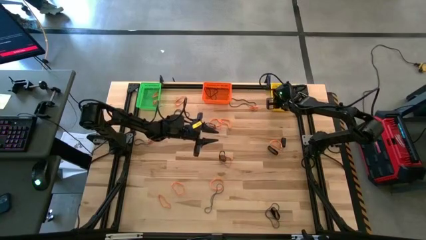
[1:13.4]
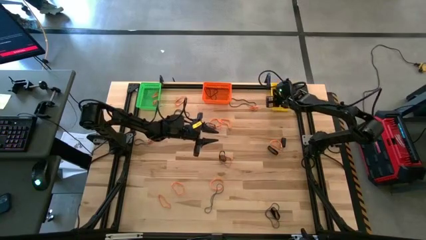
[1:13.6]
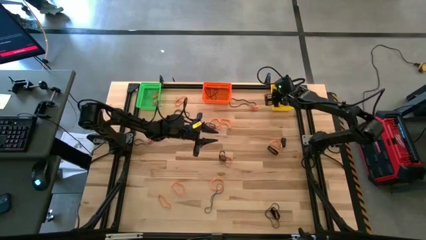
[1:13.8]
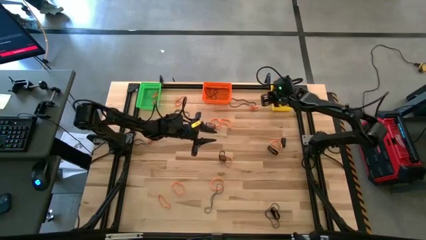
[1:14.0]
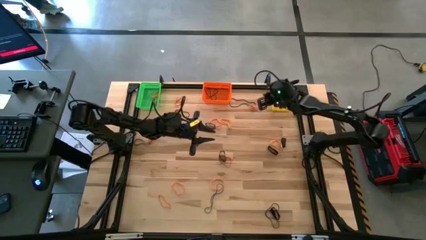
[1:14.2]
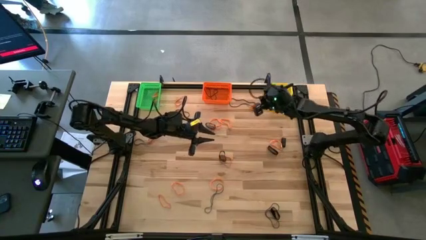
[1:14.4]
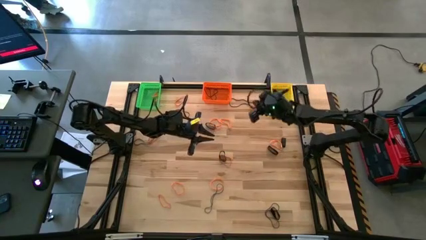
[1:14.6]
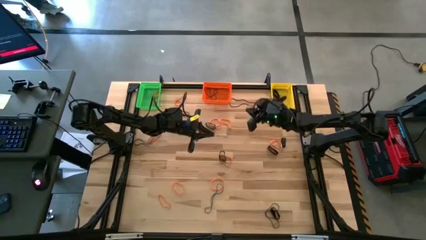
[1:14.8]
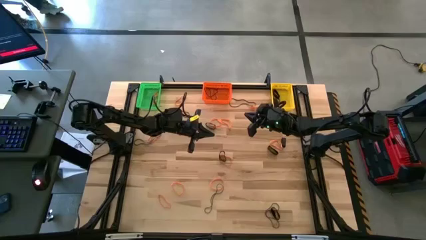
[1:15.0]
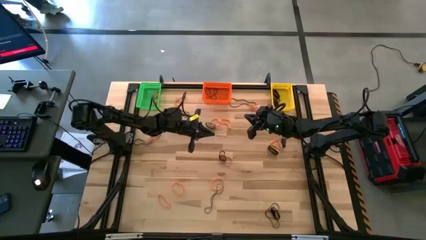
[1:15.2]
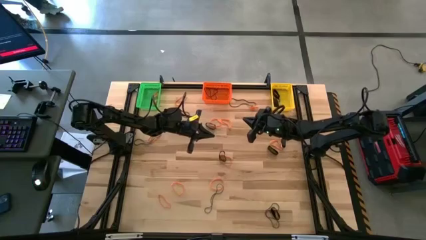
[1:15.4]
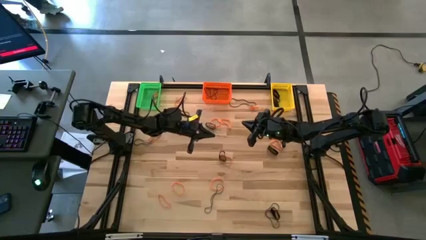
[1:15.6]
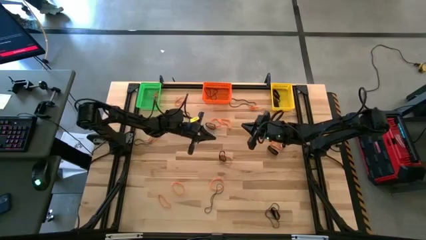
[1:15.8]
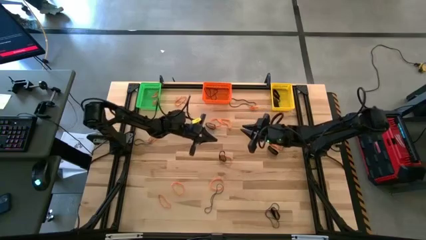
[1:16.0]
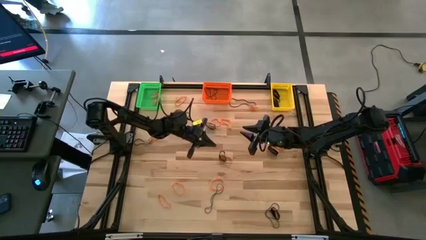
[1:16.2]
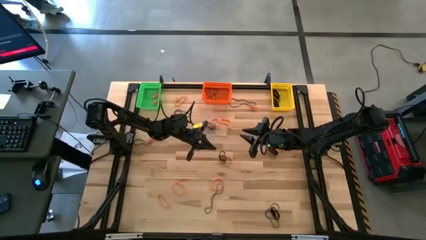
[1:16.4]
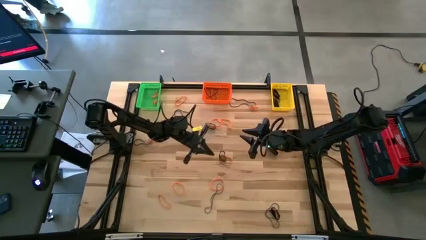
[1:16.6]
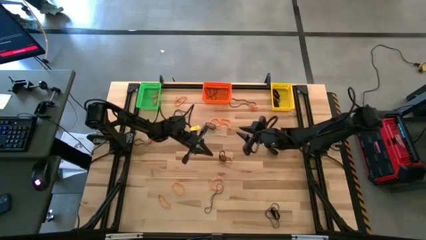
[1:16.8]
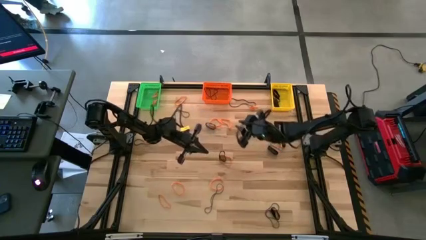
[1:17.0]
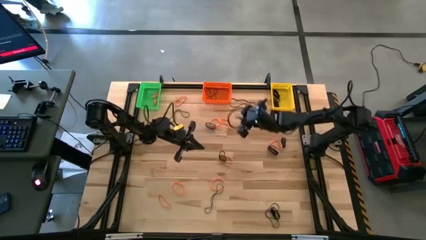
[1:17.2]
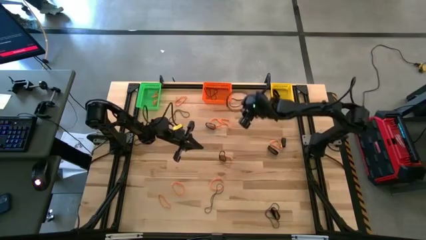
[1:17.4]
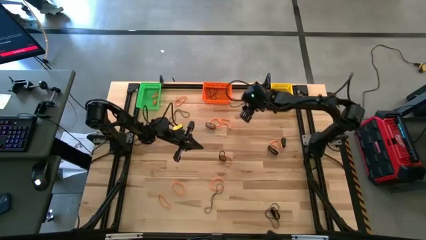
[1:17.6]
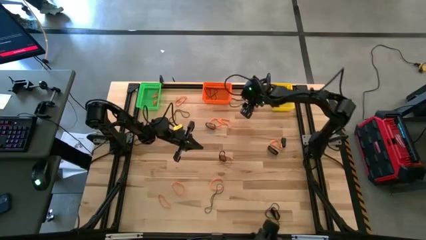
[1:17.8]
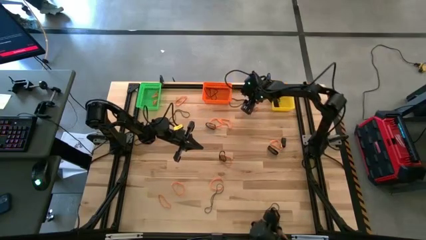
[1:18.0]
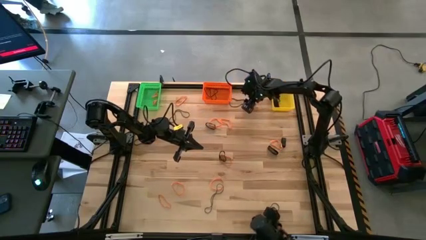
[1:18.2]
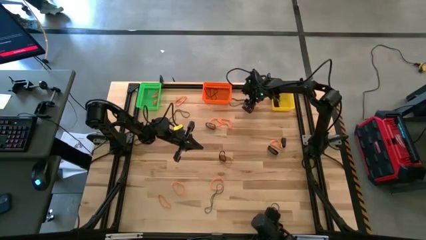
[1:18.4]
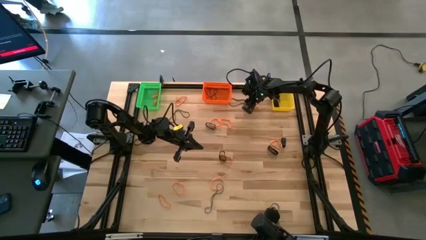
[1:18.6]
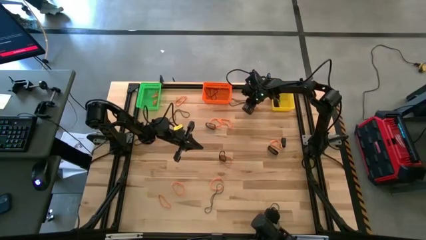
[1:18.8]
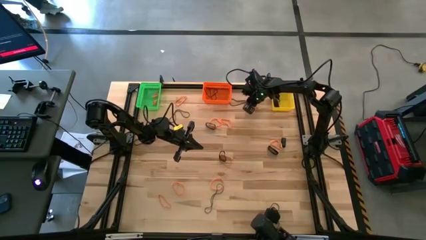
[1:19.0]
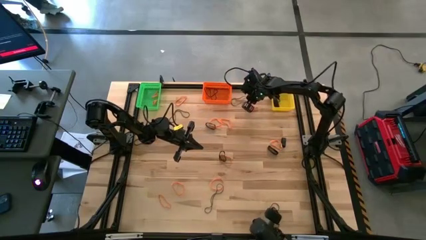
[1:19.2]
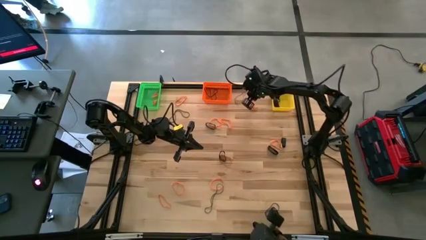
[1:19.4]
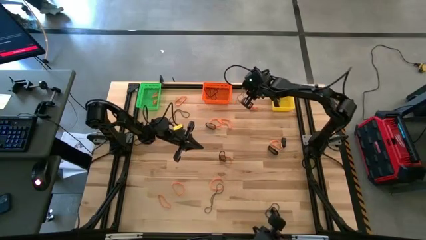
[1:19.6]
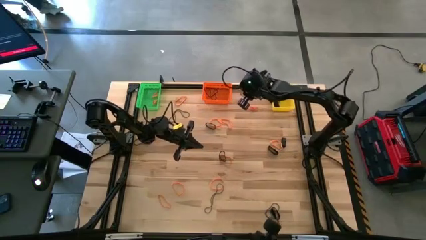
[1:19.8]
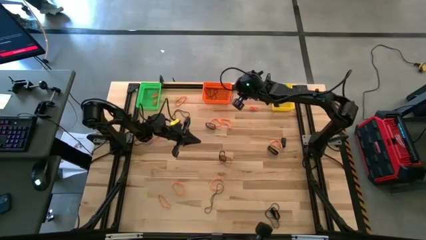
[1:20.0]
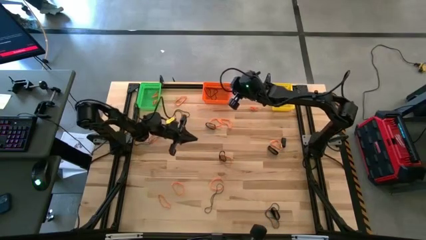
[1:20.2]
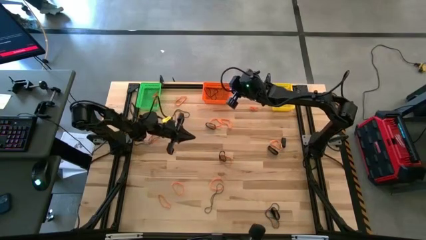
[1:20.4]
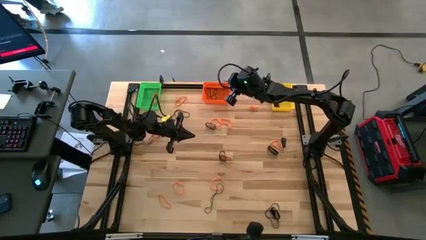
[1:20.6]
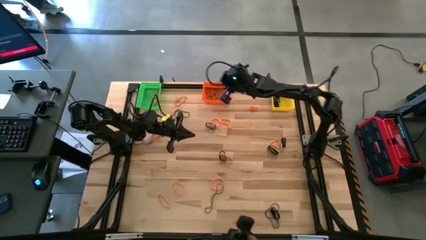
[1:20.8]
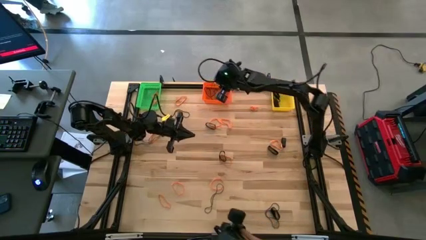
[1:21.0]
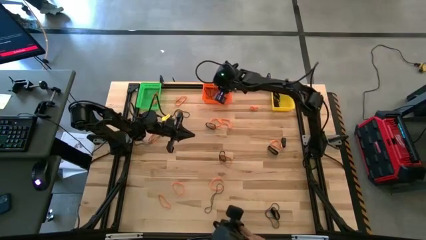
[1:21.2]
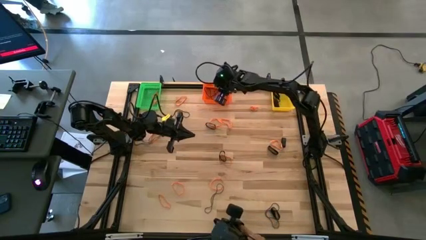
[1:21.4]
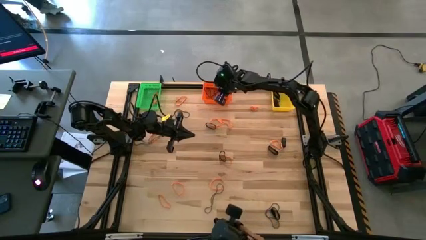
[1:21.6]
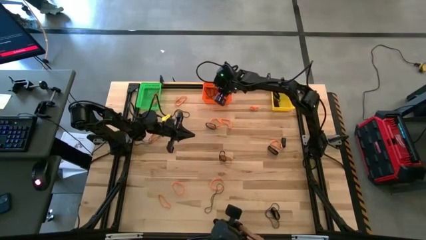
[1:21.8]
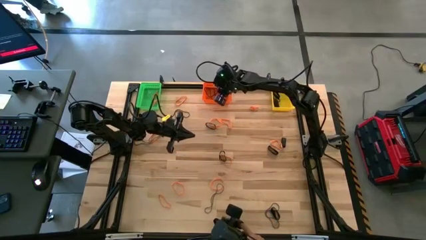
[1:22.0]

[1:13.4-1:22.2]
Task: Sort rubber bands into baskets
Put the top right blue rubber band into the orange bin

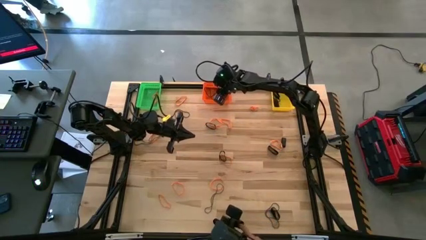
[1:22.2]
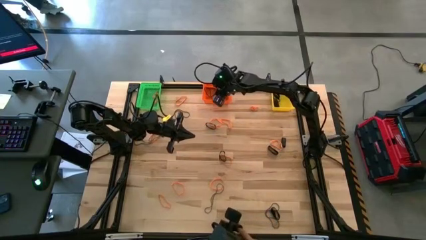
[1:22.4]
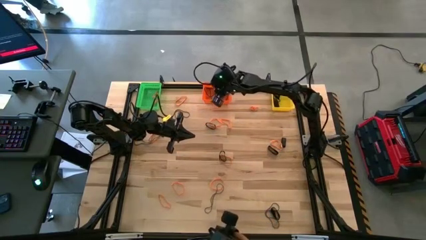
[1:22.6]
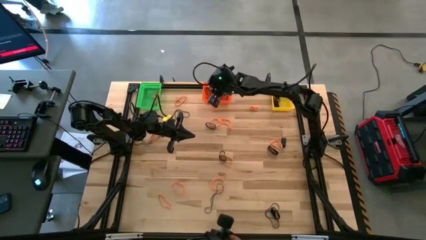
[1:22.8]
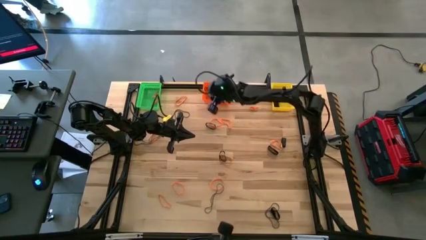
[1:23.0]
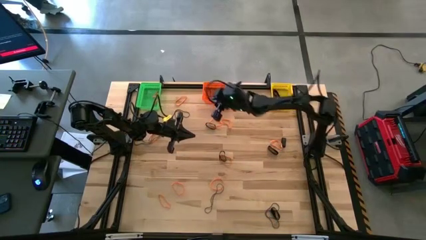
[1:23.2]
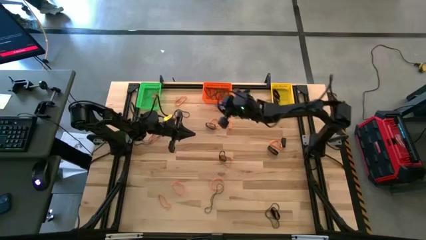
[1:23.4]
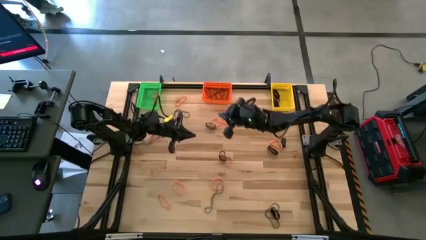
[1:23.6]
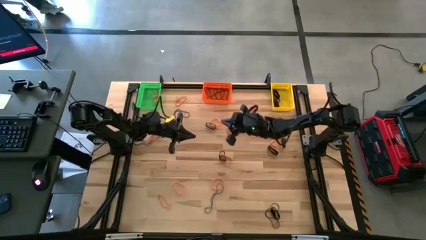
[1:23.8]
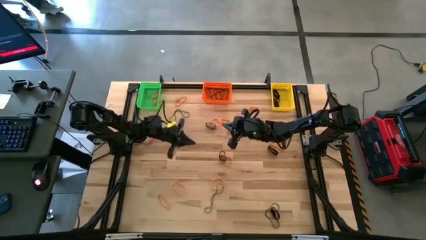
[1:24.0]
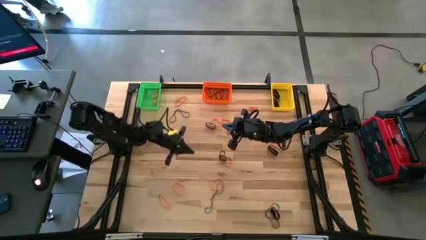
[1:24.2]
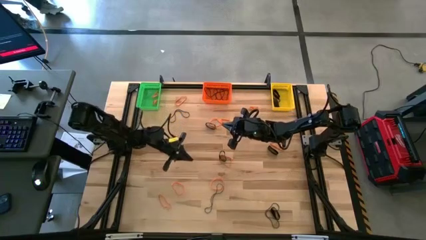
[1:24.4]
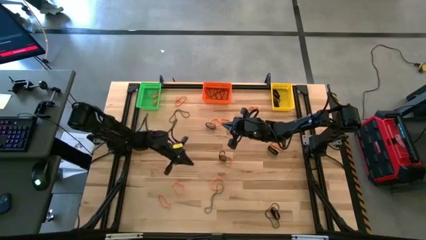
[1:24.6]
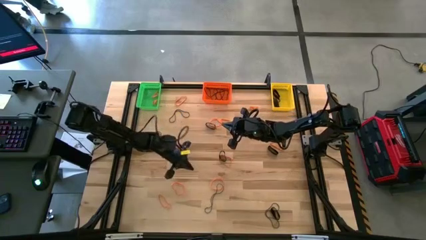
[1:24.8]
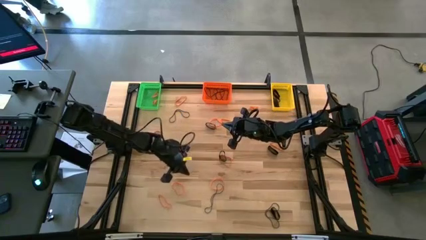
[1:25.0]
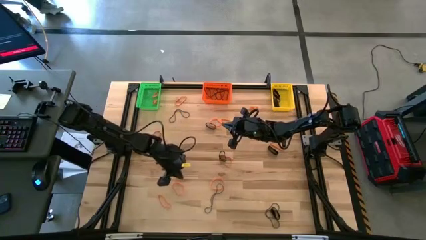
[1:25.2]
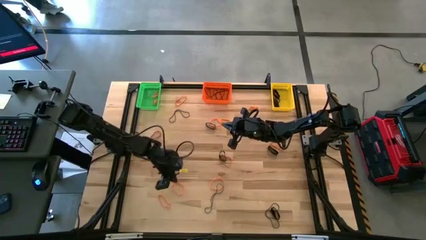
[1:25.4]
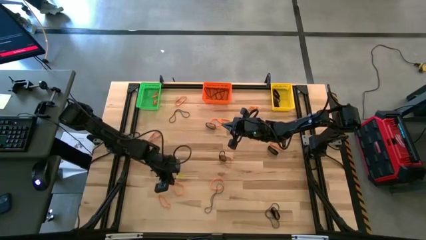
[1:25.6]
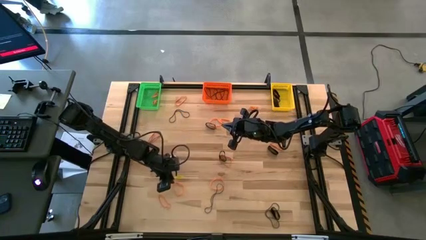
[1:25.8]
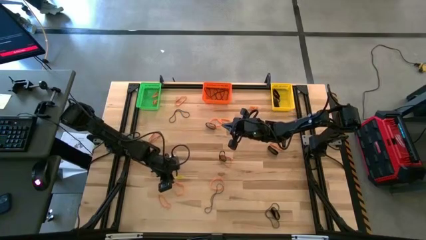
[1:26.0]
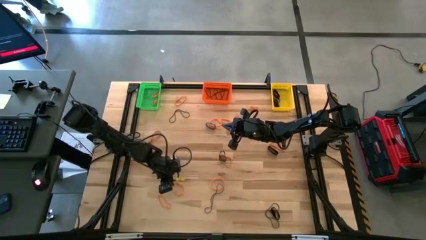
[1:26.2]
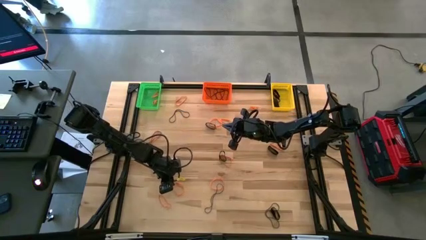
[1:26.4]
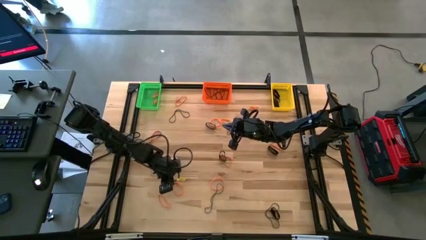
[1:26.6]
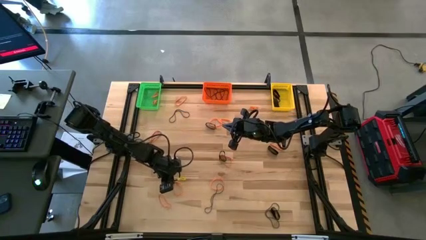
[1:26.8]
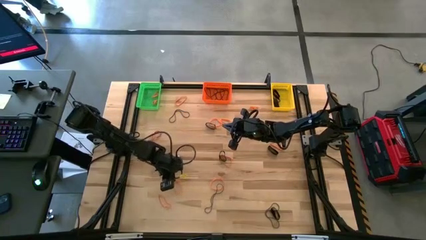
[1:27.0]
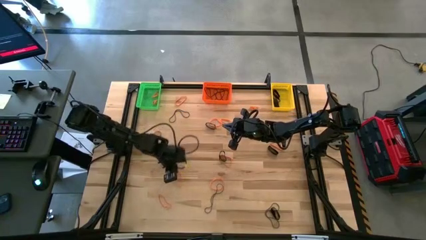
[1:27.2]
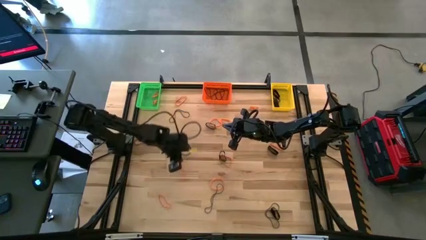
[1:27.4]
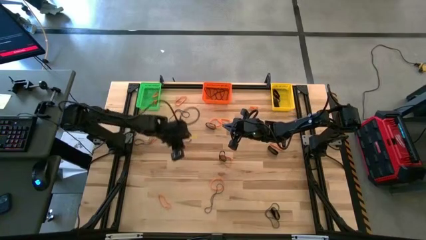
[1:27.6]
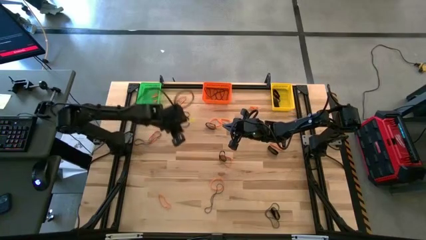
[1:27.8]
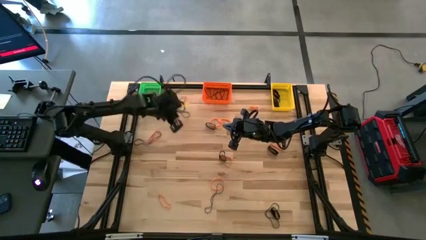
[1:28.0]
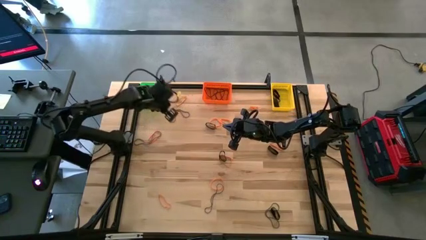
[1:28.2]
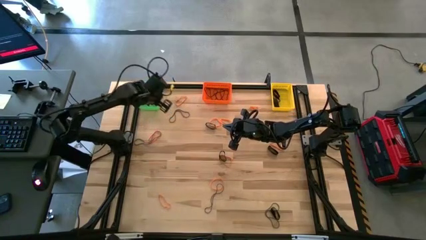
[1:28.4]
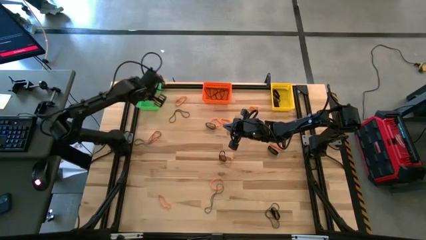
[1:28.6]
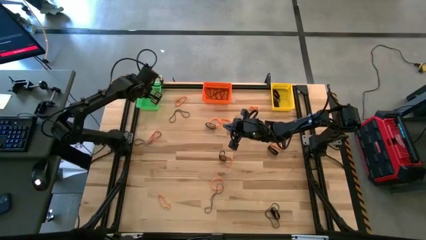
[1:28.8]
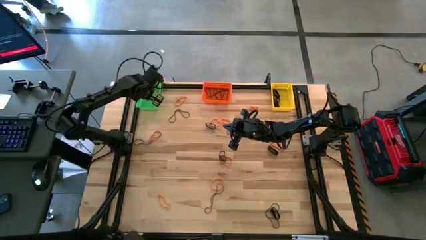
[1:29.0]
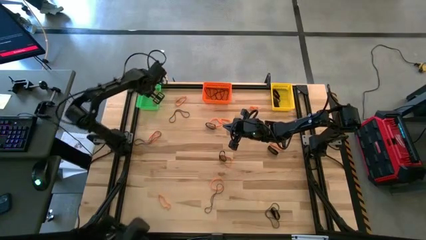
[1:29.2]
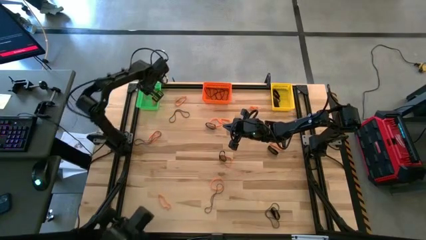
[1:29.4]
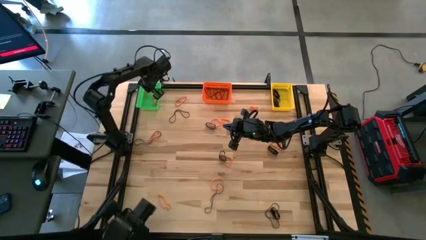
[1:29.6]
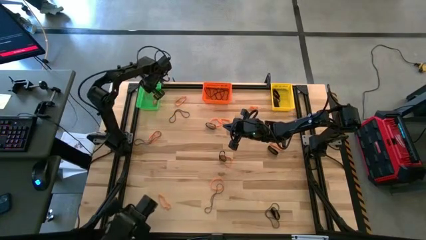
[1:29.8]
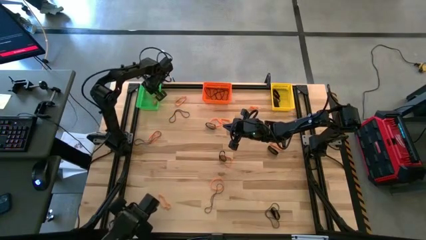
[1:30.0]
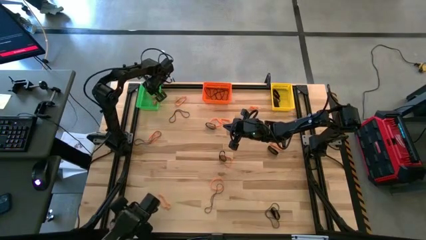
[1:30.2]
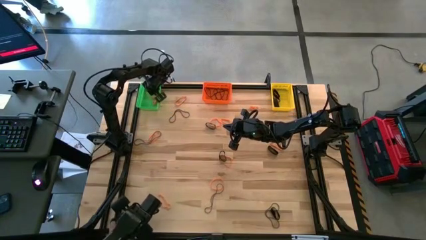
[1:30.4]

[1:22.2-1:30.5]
Put the bottom left orange rubber band into the green bin
